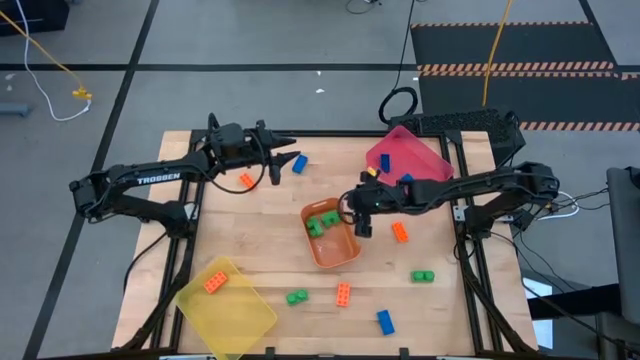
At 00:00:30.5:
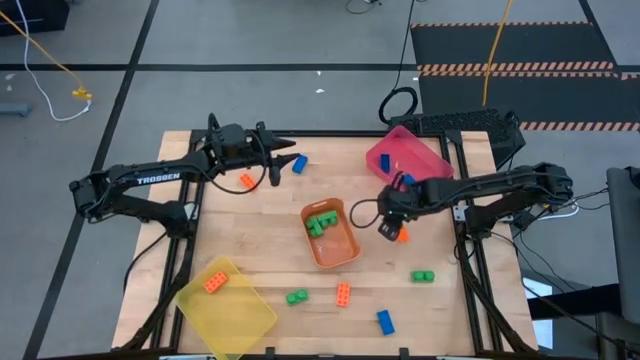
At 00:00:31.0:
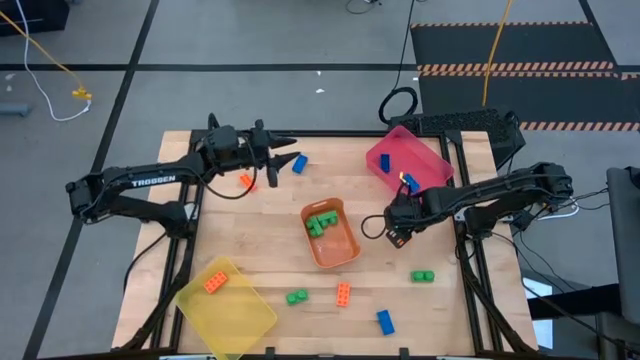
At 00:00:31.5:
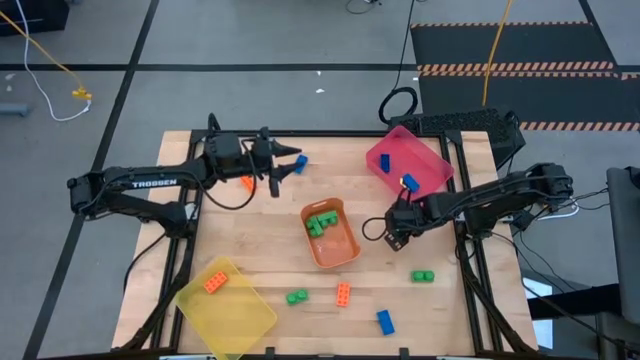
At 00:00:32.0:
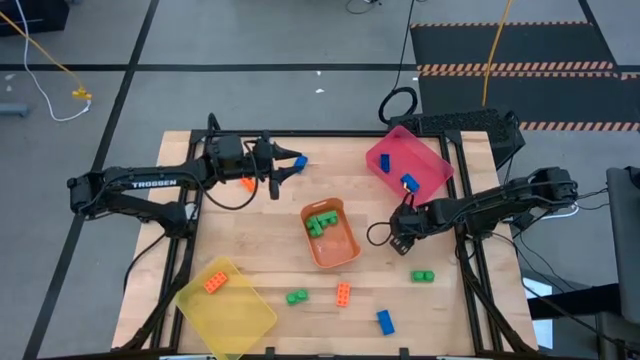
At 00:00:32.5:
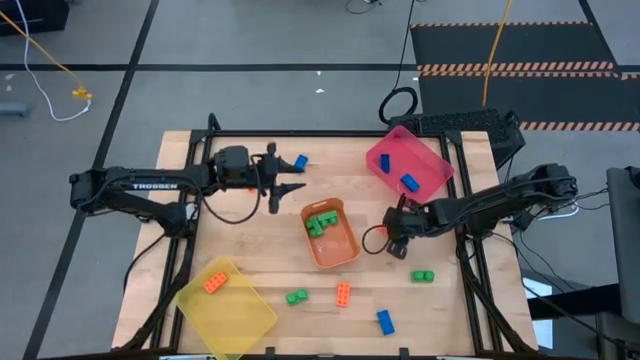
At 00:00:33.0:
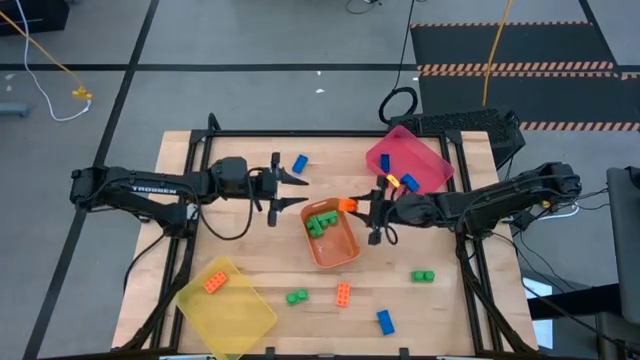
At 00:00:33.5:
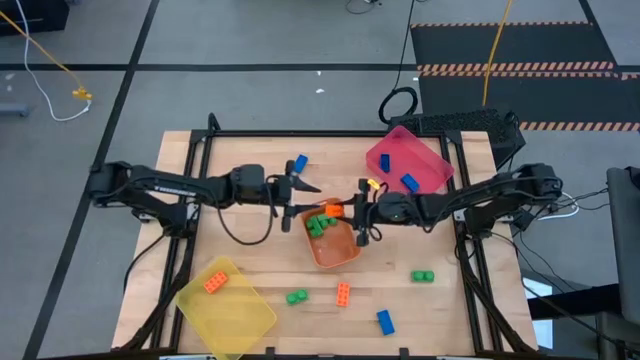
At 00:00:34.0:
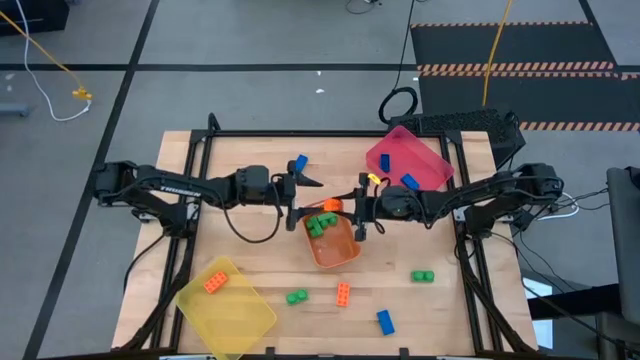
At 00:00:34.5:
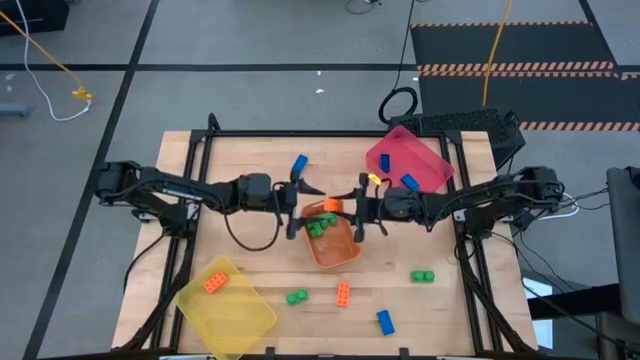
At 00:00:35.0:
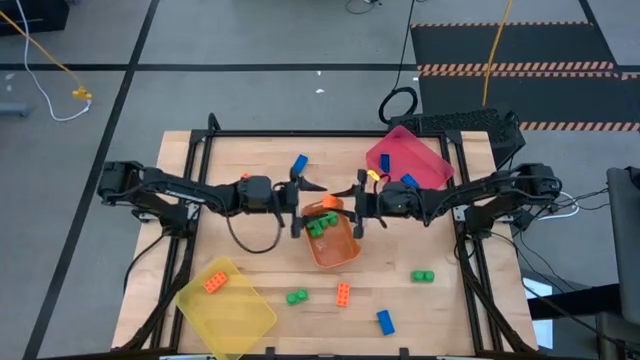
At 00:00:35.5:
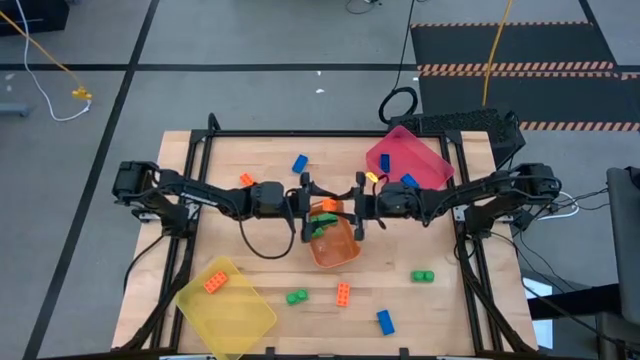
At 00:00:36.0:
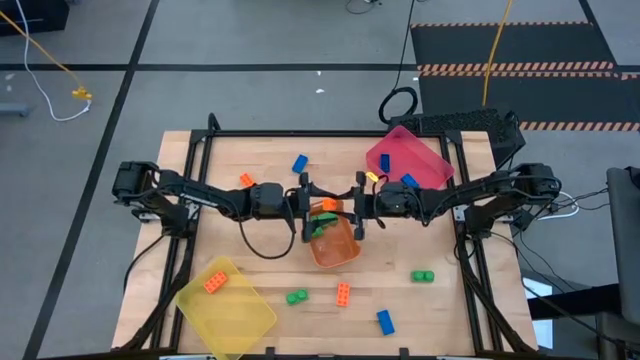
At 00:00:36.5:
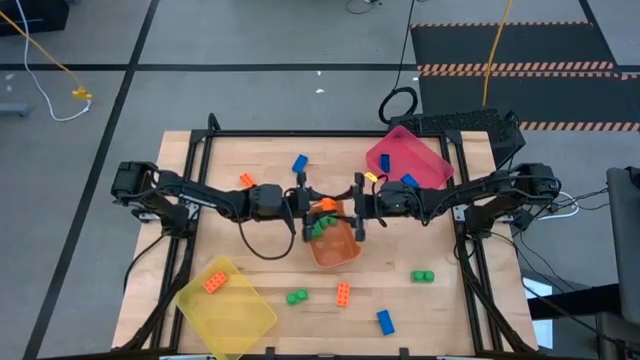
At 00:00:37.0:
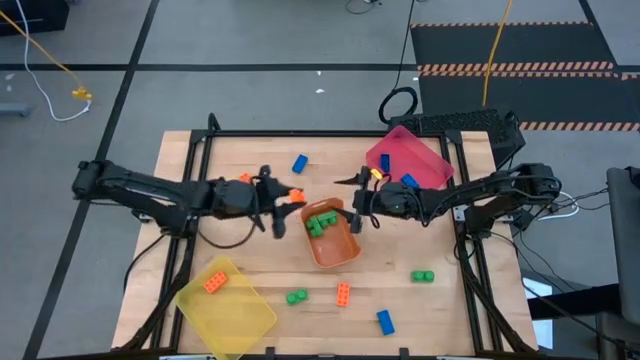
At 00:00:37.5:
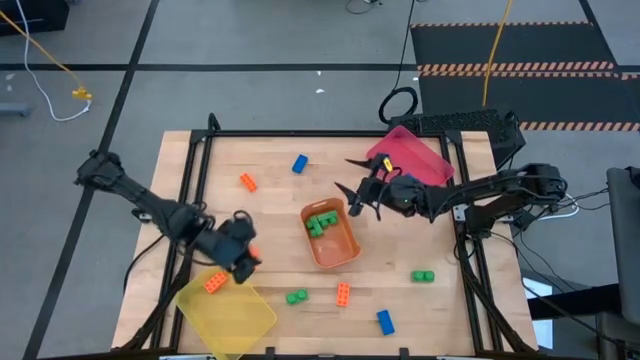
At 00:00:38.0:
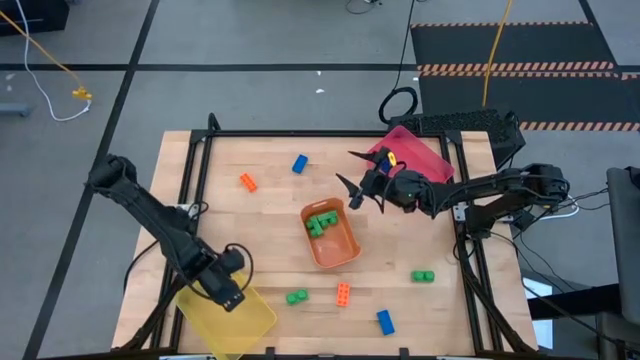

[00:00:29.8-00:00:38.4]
Task: Sort & place blocks by color
Put the orange game piece into the yellow bin

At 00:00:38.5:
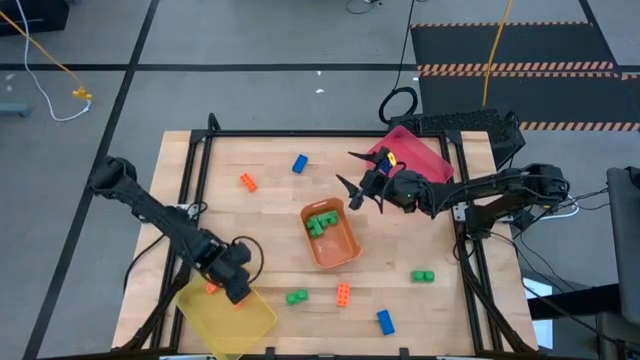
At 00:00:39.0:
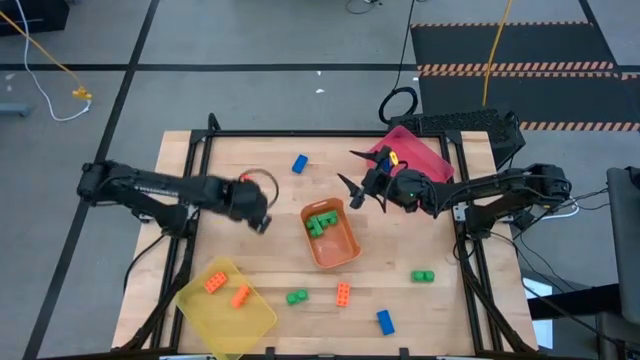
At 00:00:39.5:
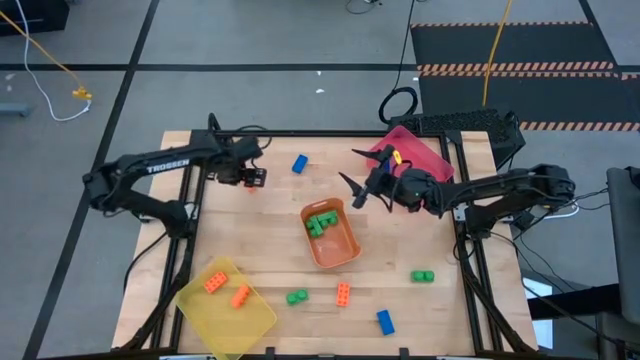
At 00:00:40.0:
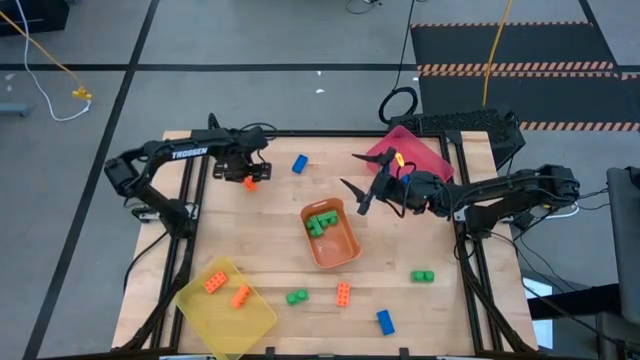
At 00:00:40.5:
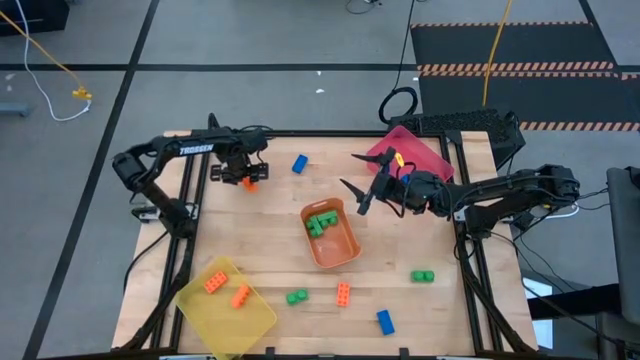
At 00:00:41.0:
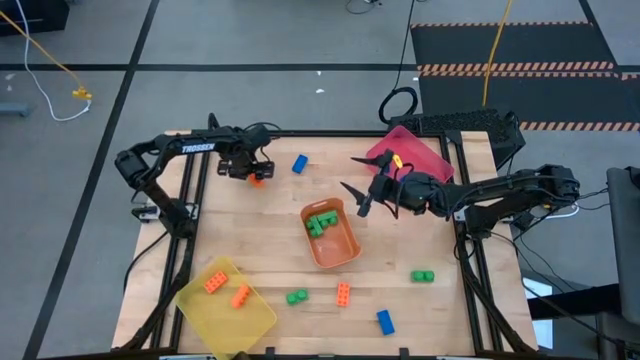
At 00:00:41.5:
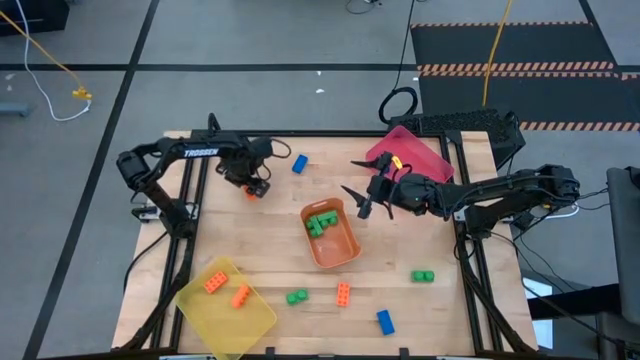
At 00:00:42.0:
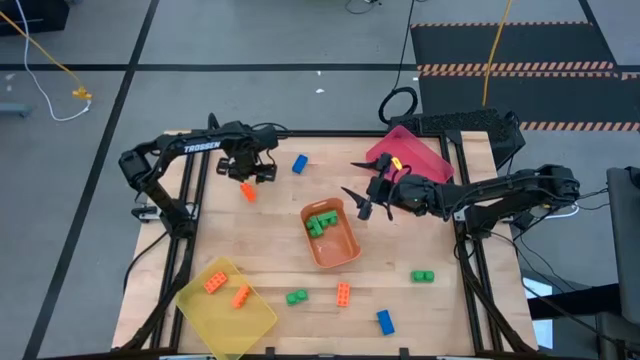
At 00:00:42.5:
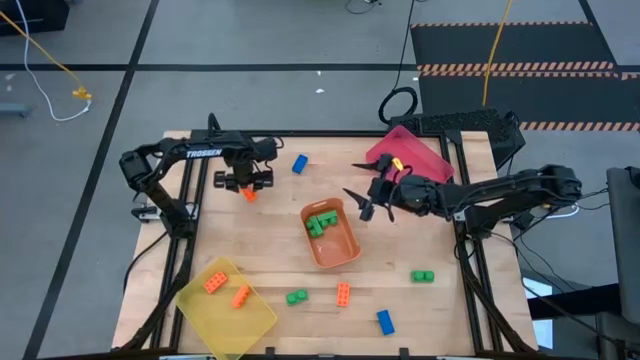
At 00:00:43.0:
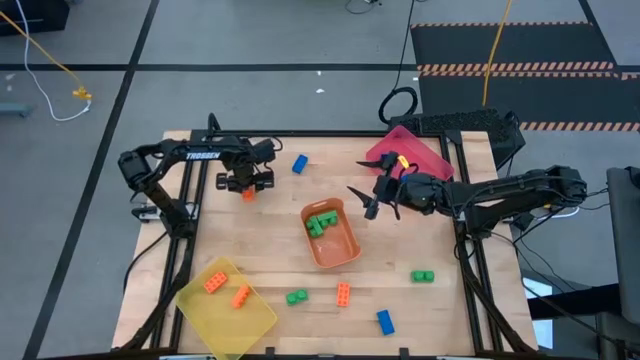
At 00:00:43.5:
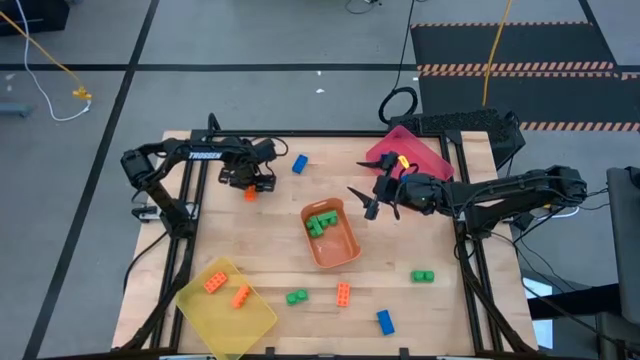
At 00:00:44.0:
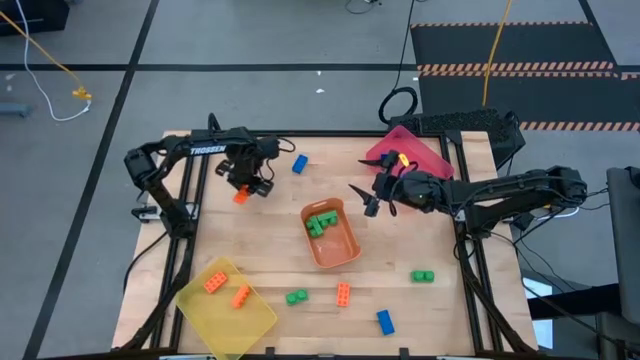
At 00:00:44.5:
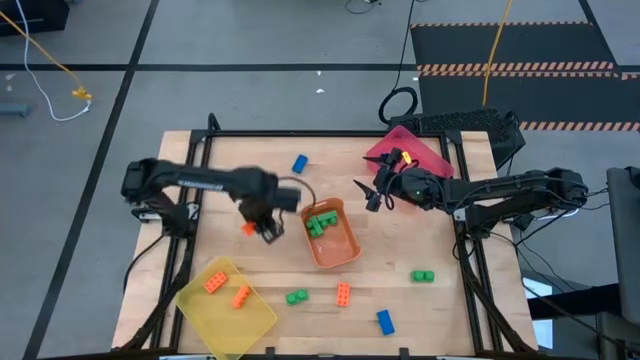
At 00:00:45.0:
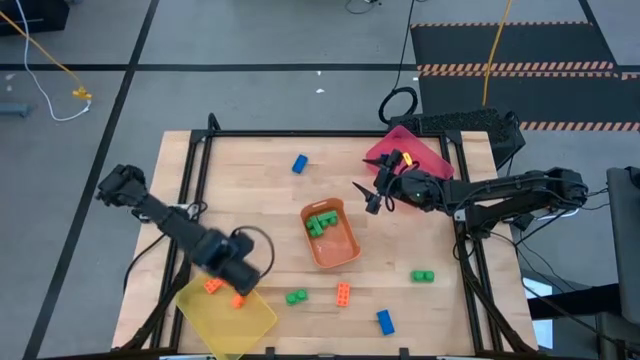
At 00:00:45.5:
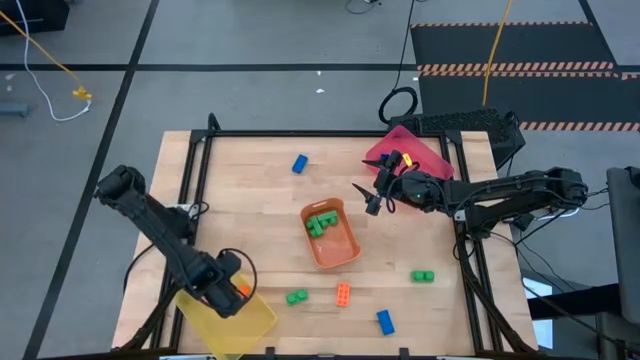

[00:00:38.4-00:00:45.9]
Put the orange game piece into the yellow bin

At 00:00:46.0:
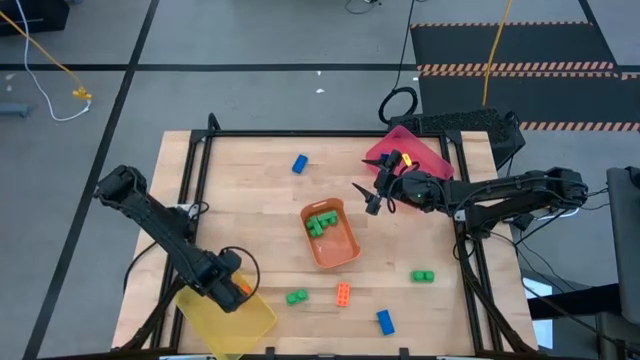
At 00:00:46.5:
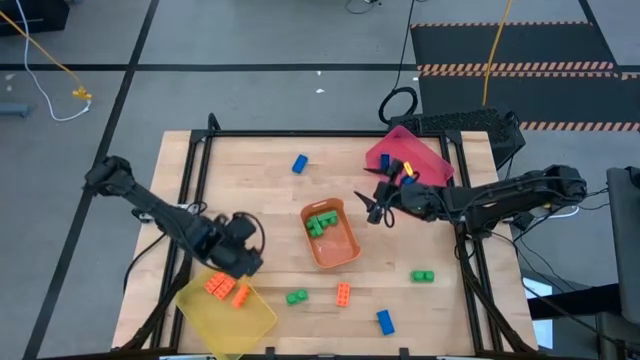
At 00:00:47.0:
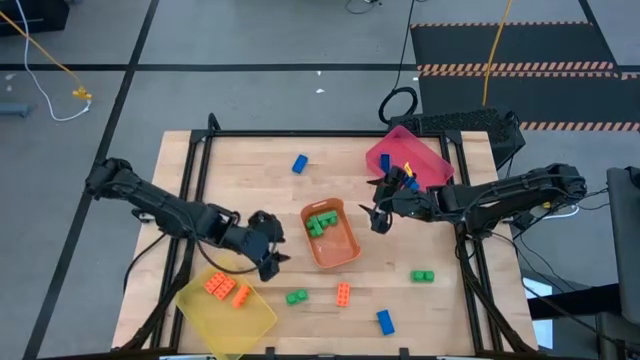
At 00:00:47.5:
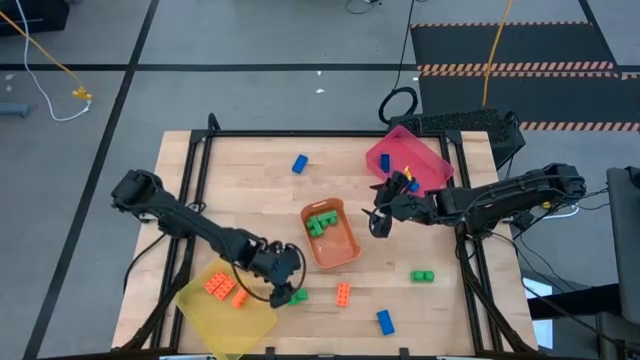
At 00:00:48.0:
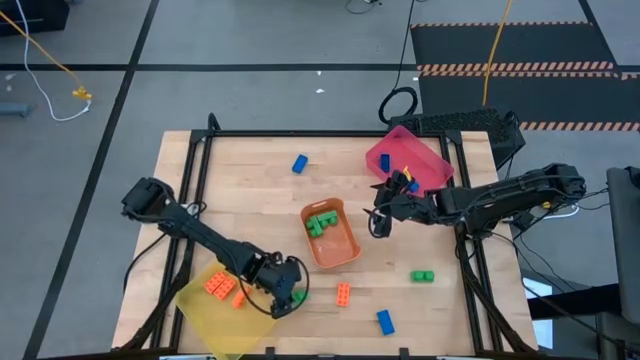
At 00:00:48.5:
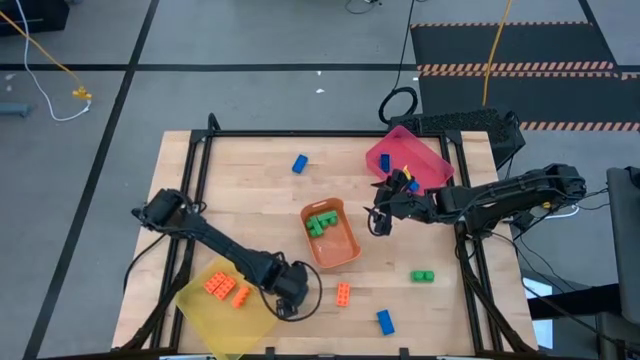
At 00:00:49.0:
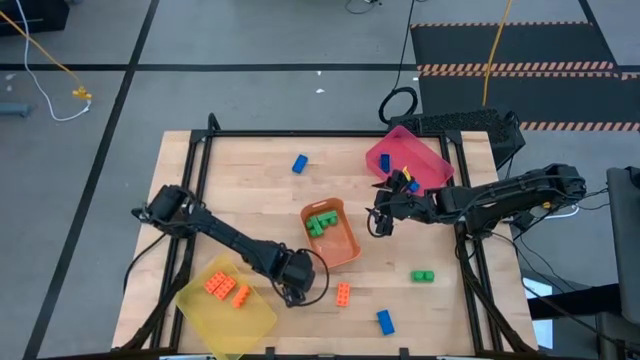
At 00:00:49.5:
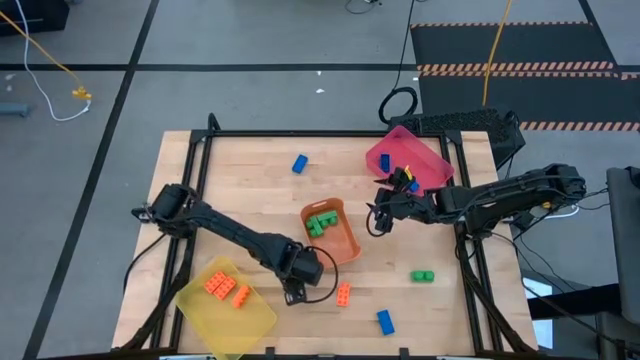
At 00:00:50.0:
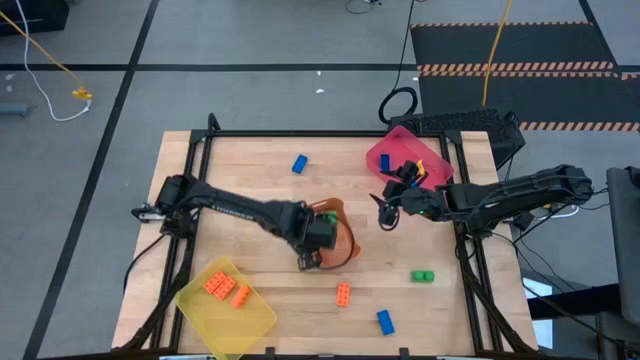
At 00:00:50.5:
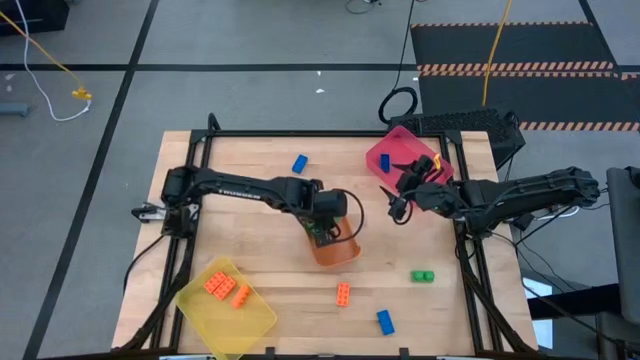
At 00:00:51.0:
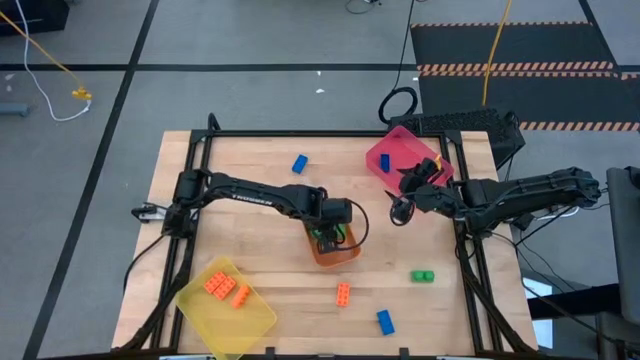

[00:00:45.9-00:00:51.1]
Put the green game piece into the orange bin
